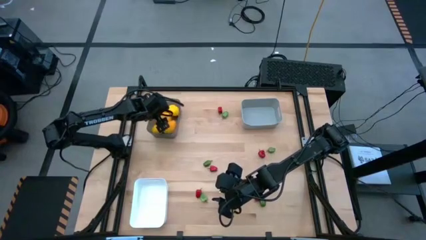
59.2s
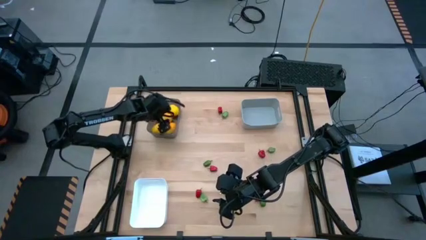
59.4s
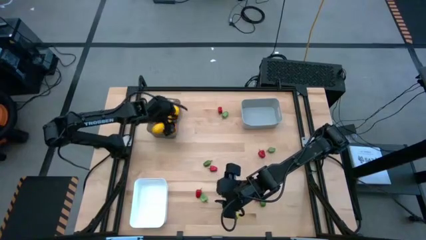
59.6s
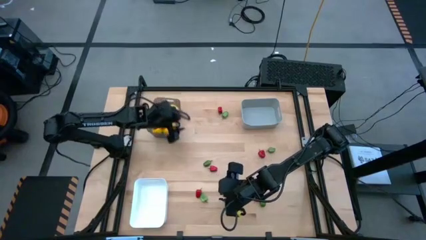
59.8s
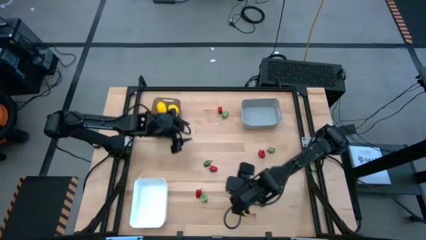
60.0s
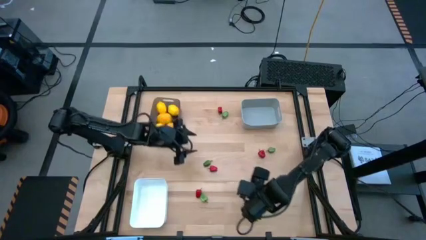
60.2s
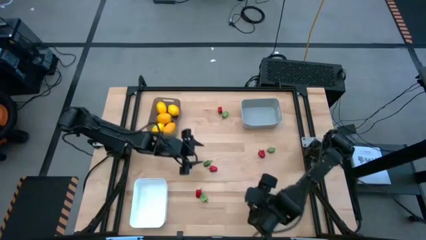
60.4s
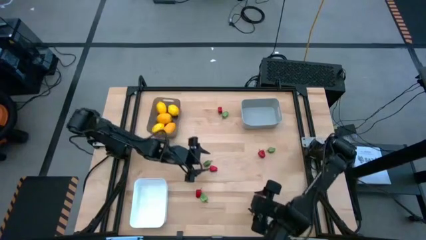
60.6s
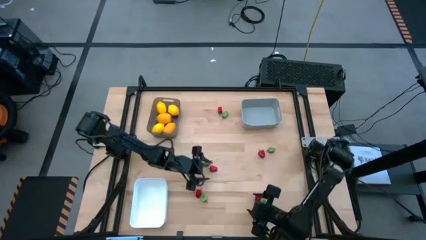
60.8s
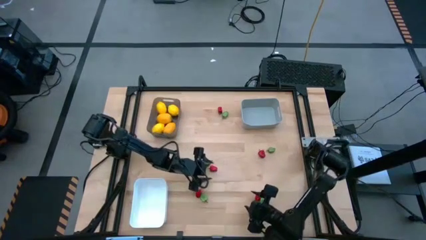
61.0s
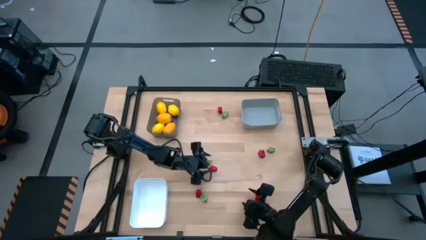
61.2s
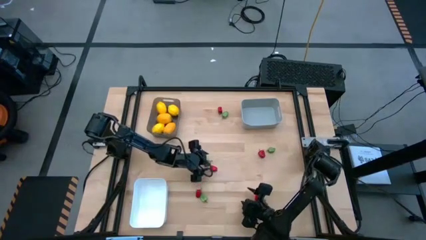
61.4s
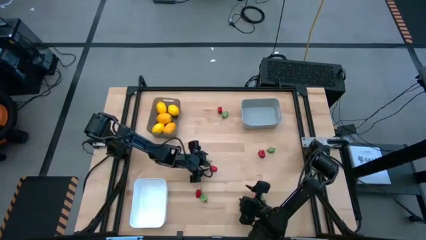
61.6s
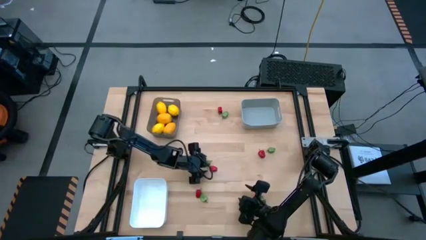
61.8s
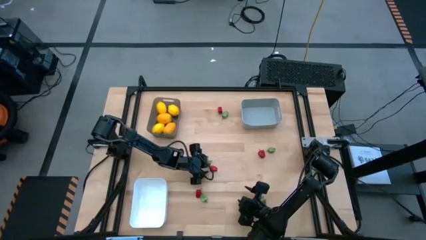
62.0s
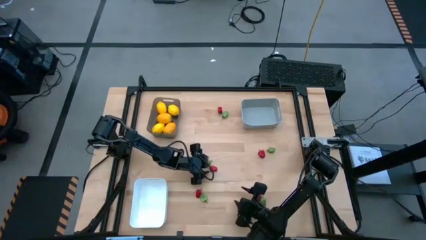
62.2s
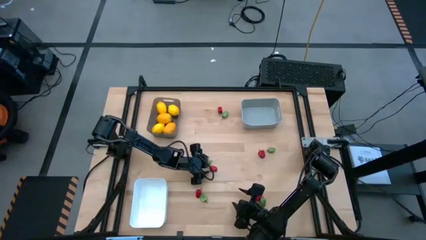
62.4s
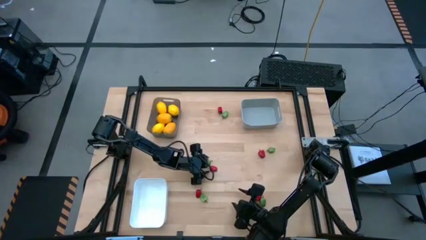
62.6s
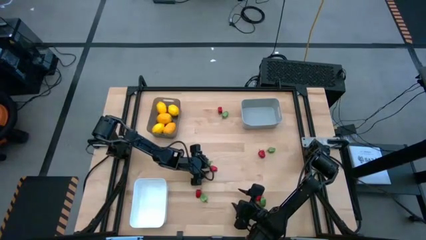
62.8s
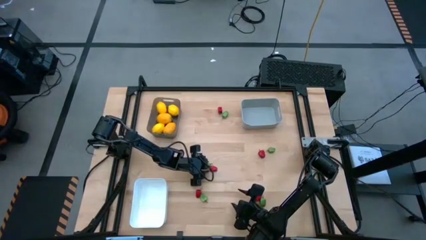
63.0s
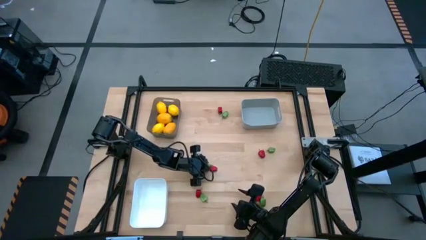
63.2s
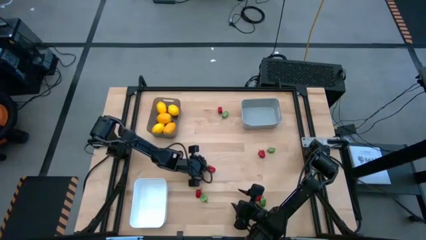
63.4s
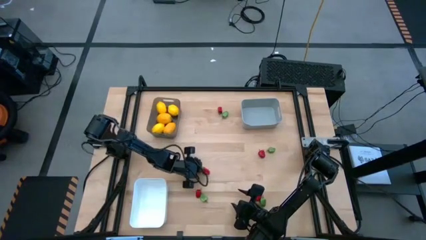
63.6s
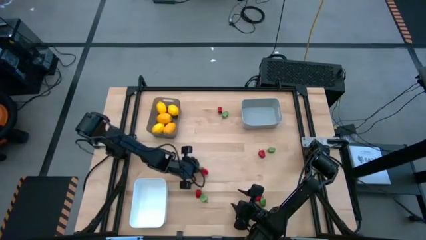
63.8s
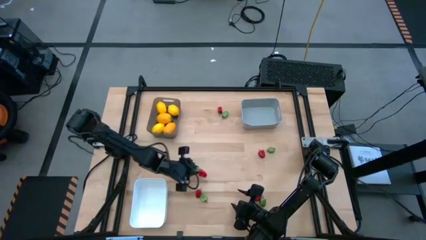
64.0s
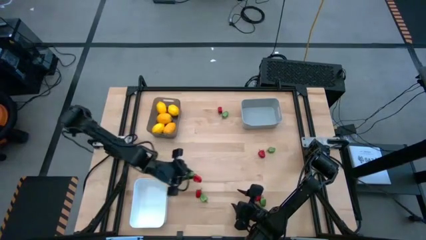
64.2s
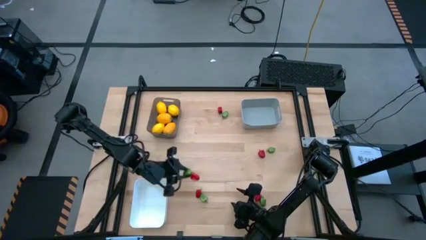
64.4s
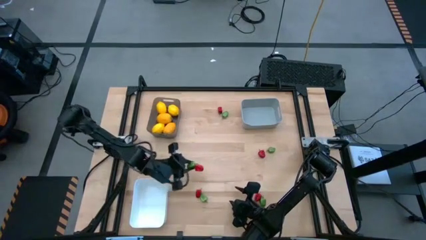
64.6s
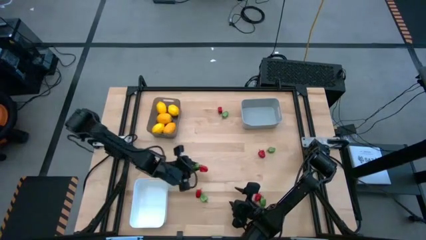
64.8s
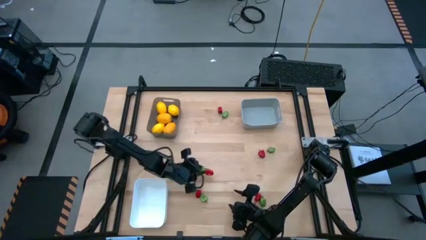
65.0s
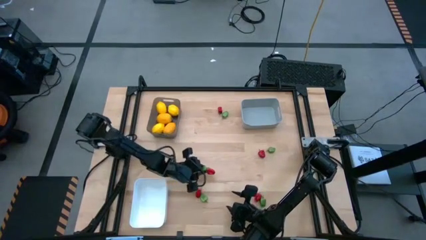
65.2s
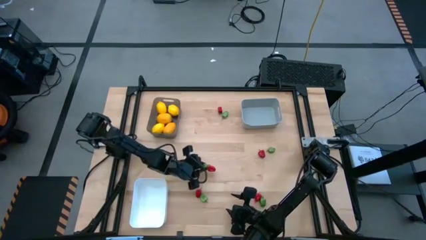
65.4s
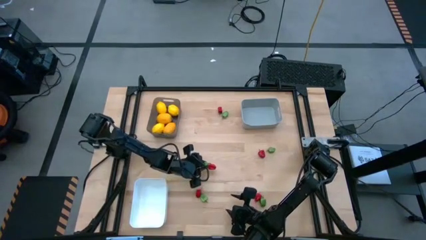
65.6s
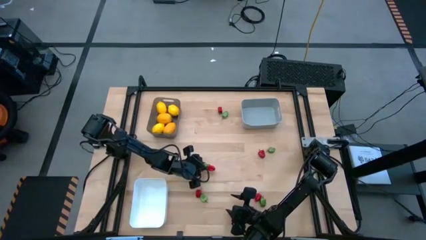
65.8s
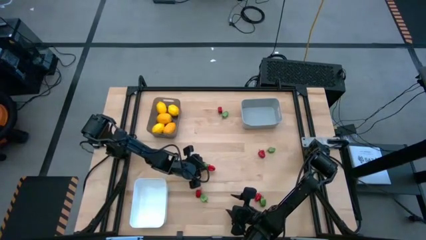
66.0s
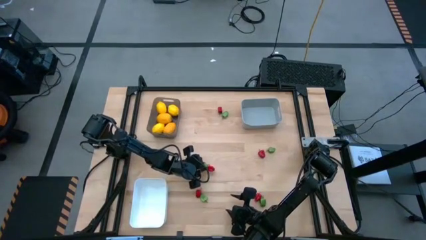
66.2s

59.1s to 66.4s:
Task: Sort produce into baskets
Put the green bell pepper into the white bin

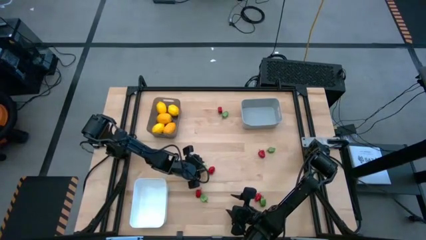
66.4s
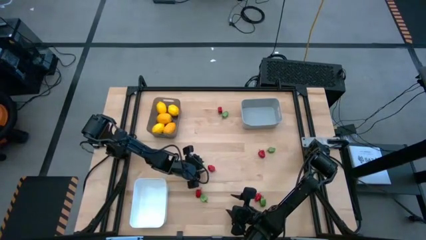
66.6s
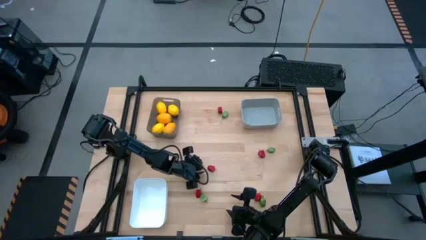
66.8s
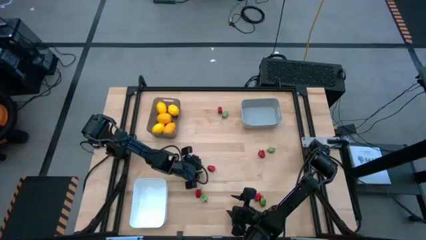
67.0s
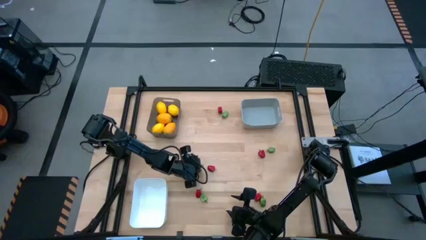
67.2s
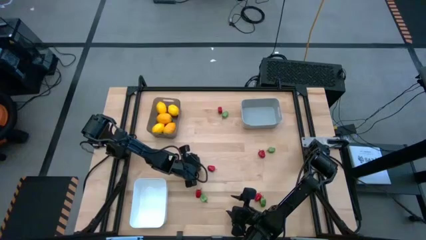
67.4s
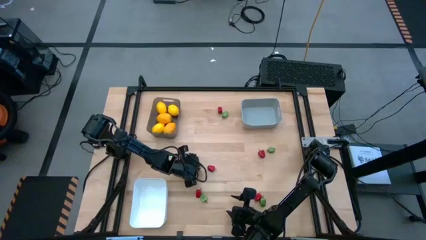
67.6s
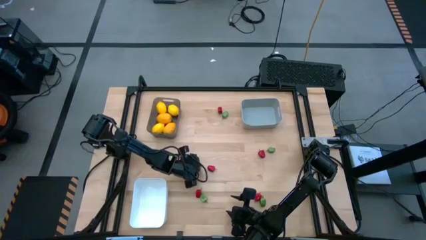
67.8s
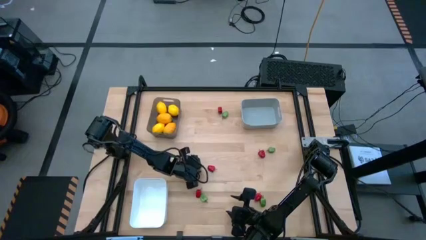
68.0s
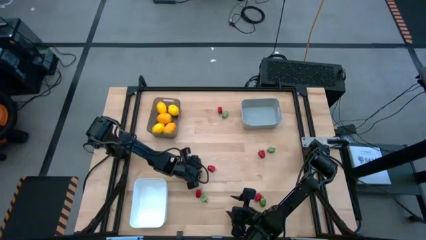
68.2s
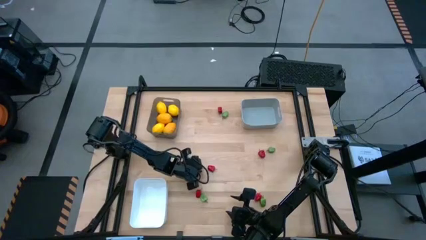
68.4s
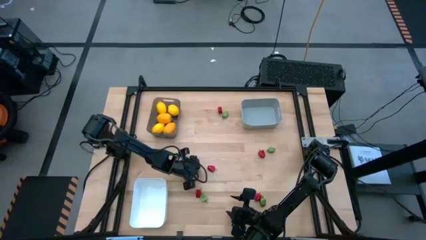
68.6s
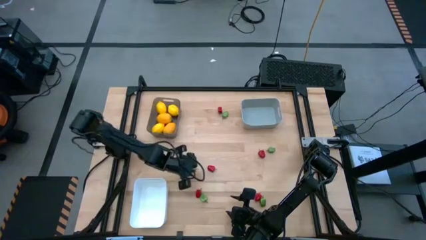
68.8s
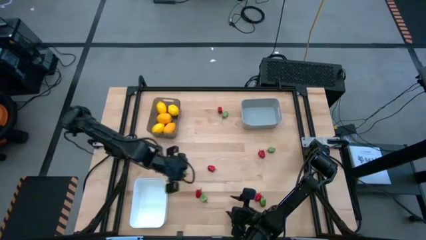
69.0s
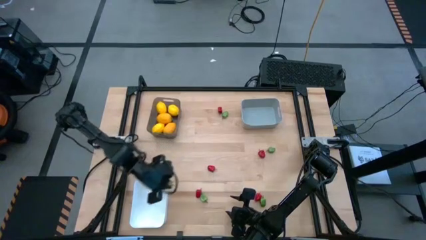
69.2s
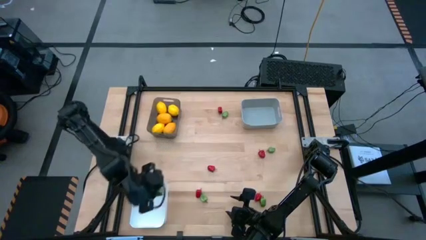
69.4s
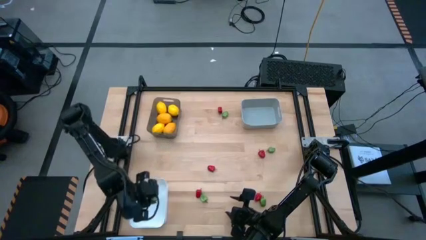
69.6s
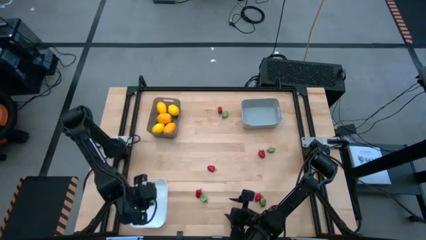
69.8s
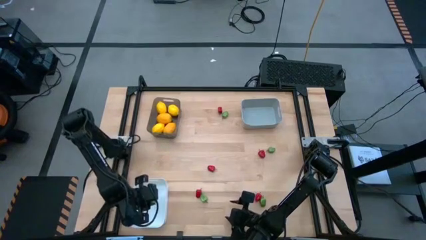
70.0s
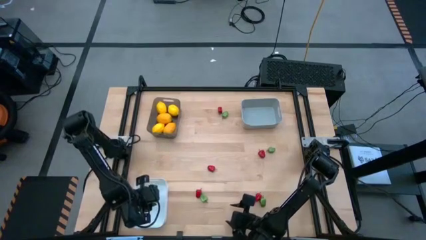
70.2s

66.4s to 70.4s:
Put the green bell pepper into the white bin

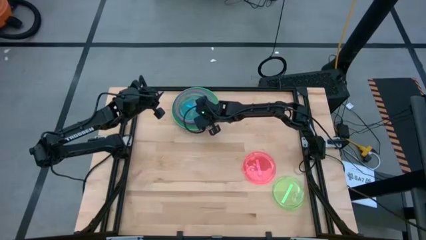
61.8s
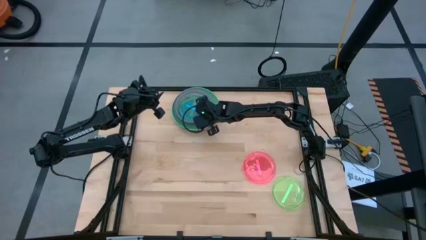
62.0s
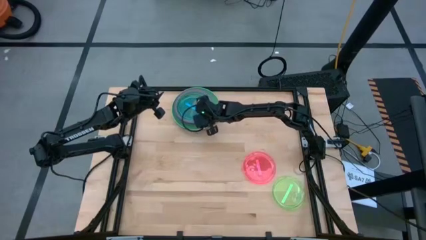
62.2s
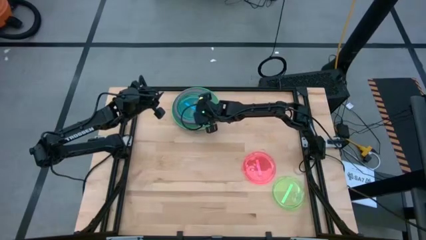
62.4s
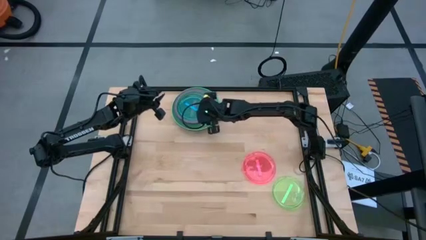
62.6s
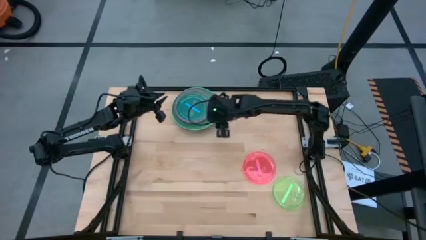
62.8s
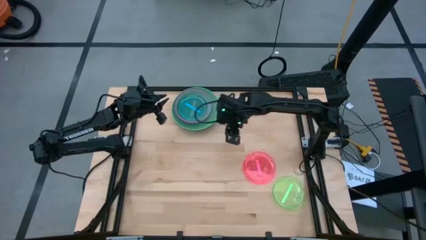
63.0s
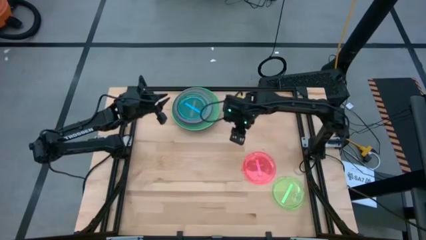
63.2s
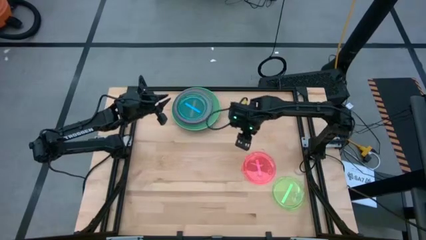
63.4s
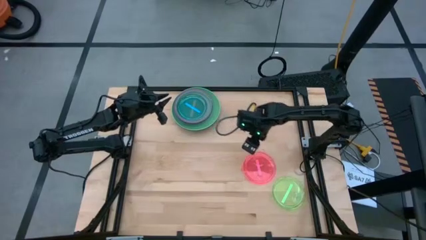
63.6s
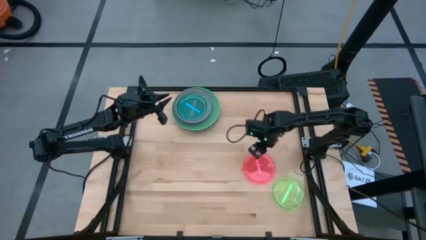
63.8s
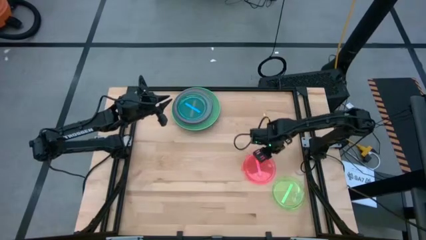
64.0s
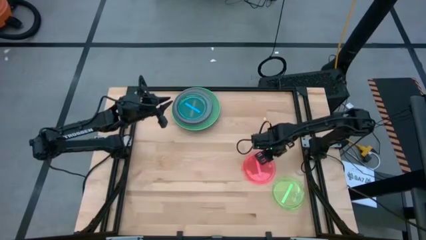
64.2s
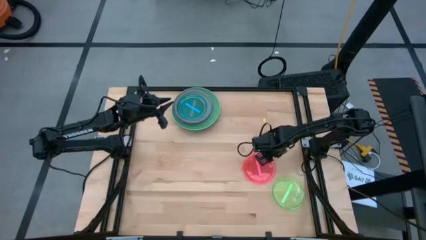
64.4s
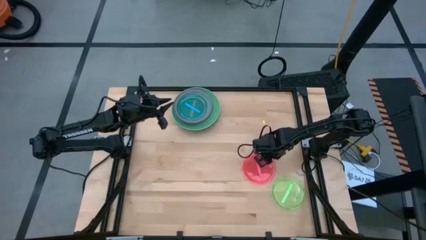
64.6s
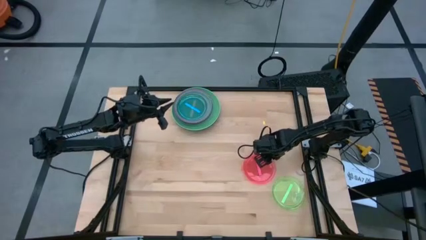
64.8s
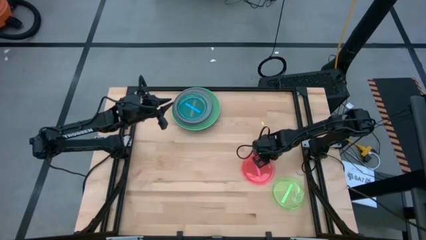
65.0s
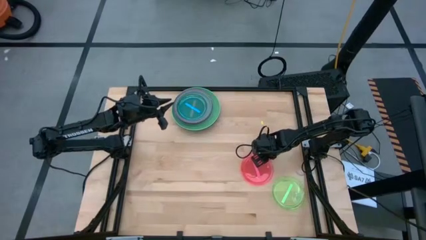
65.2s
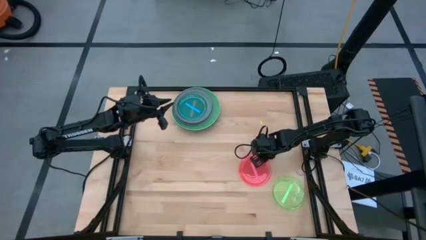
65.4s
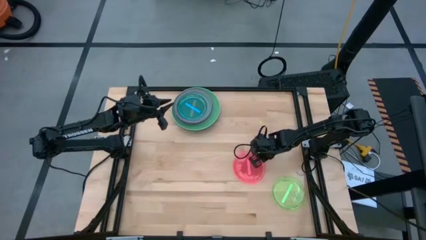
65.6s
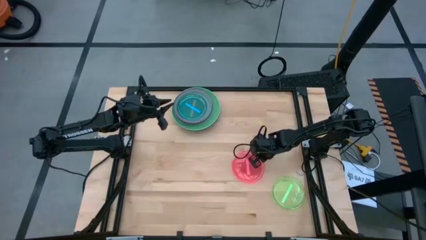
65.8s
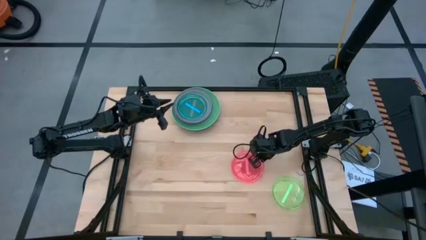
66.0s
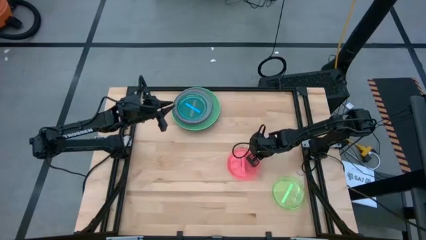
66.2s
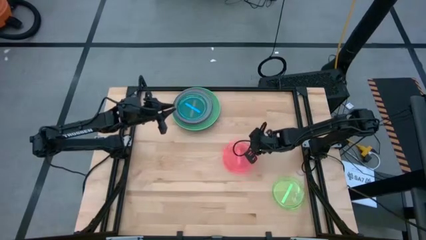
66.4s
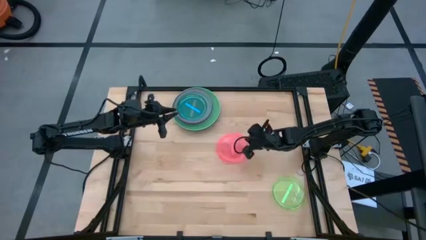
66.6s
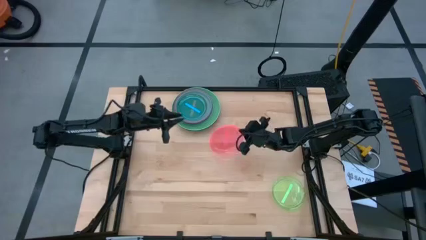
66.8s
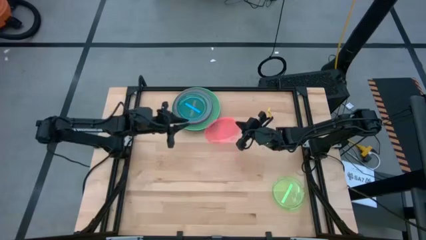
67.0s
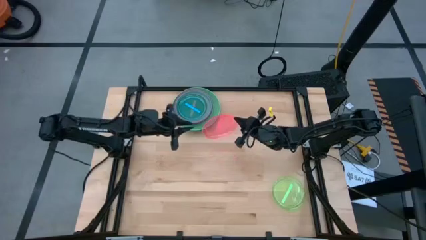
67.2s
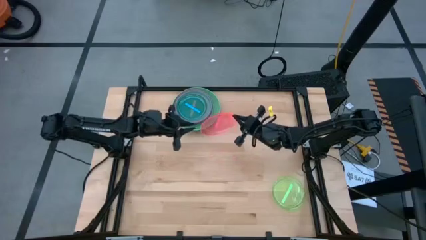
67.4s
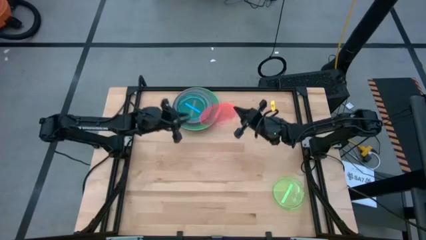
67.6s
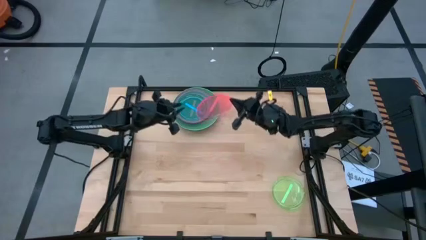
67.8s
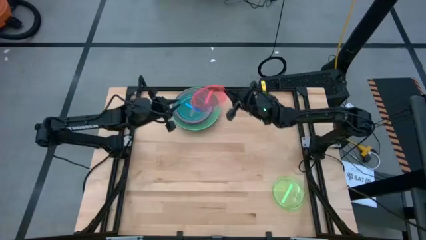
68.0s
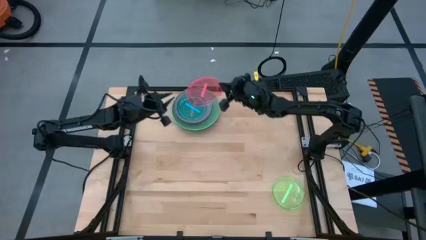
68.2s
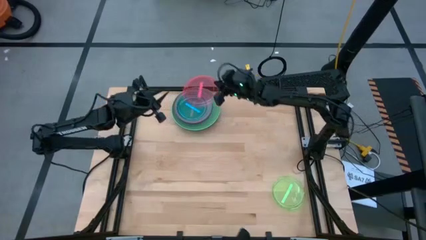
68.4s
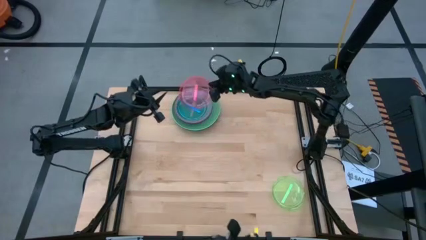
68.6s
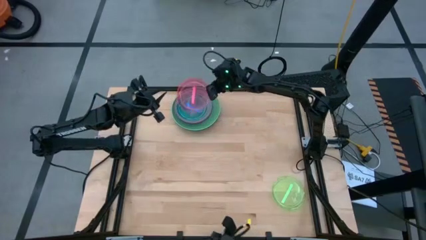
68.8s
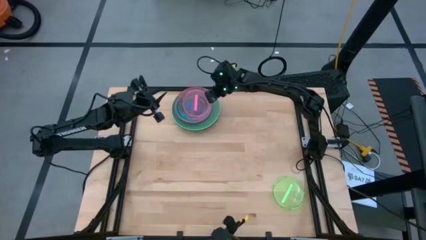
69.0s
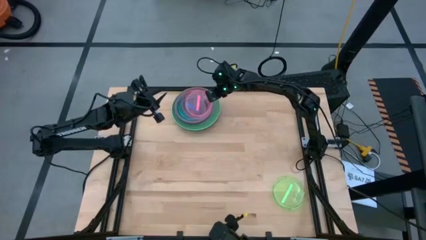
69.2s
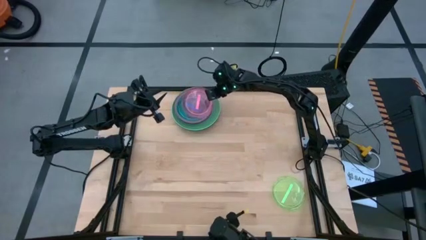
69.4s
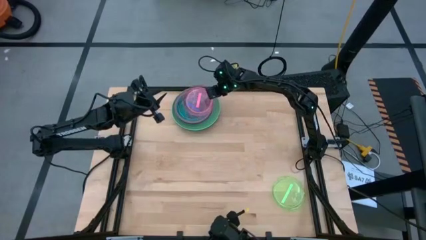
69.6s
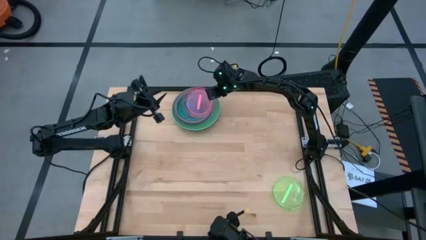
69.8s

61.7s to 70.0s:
Task: Stack plastic plates
Stack the red plate on the blue plate
